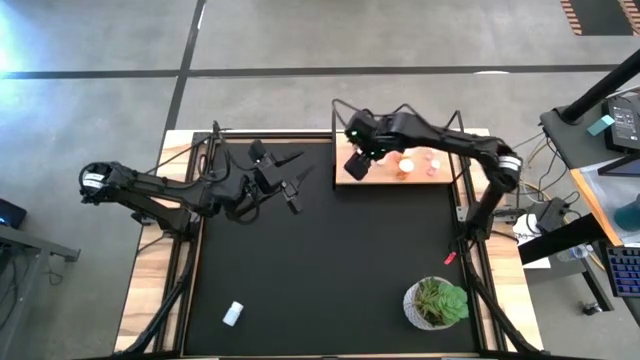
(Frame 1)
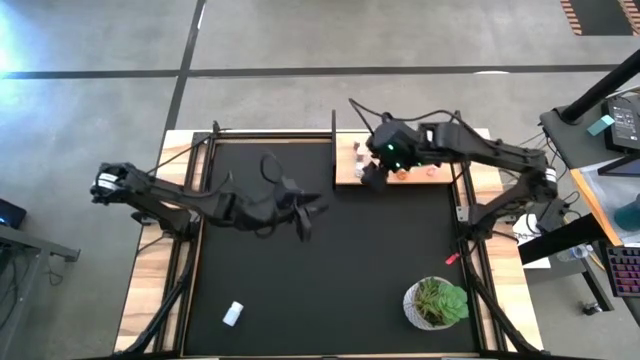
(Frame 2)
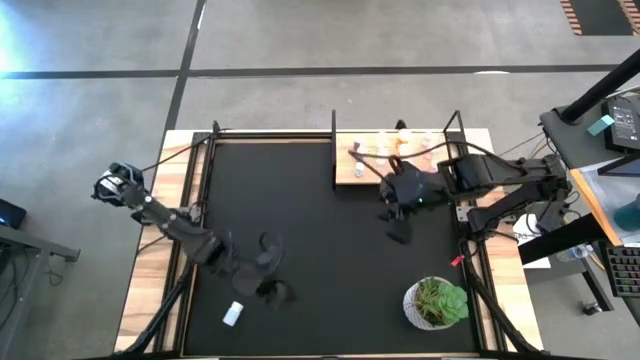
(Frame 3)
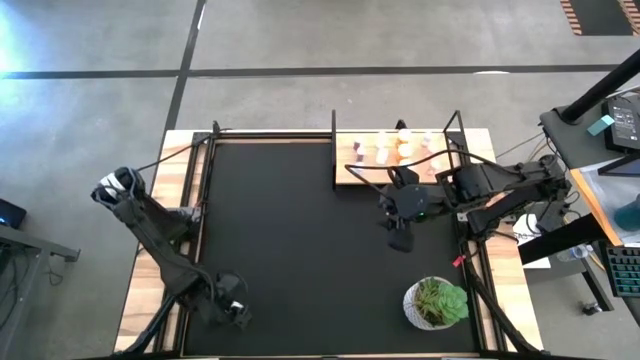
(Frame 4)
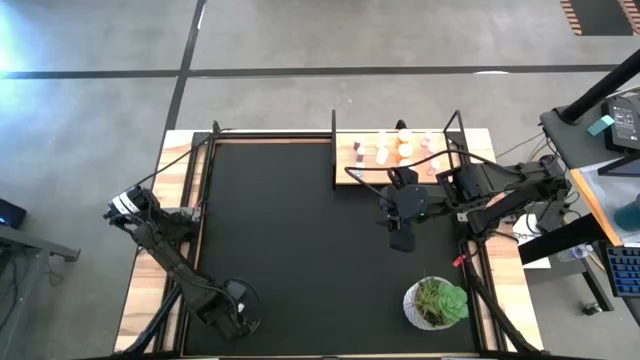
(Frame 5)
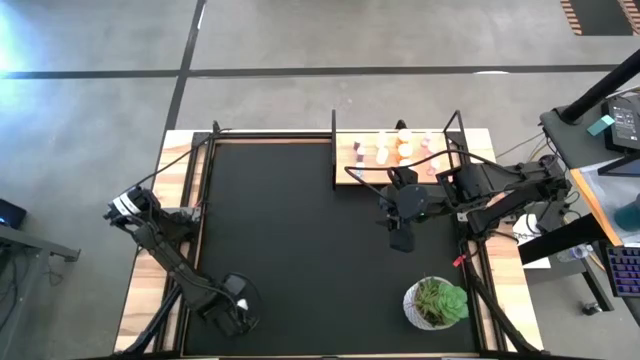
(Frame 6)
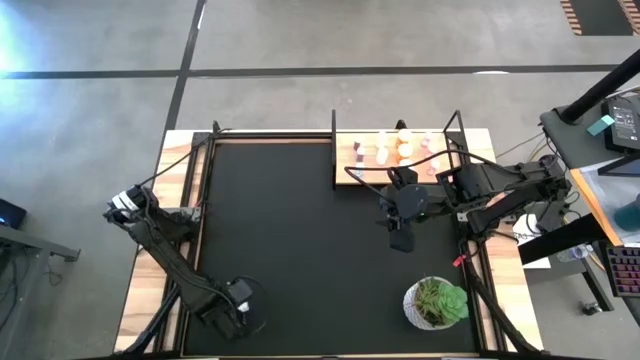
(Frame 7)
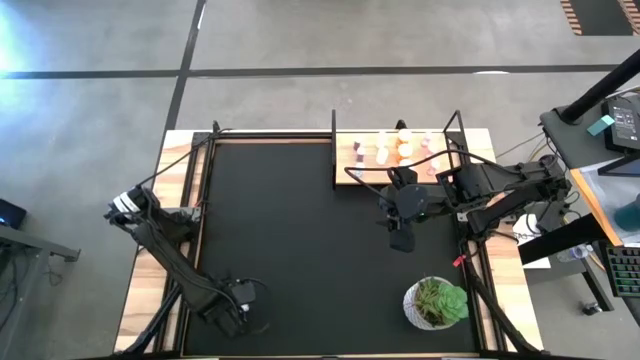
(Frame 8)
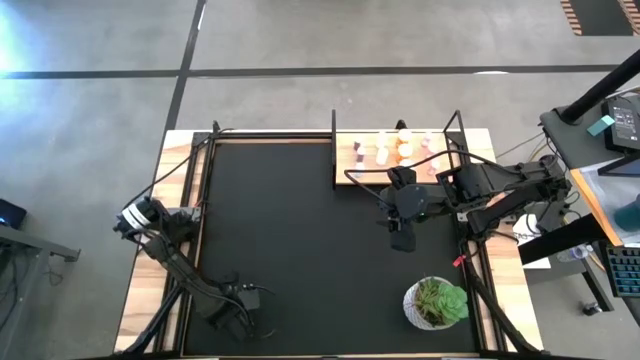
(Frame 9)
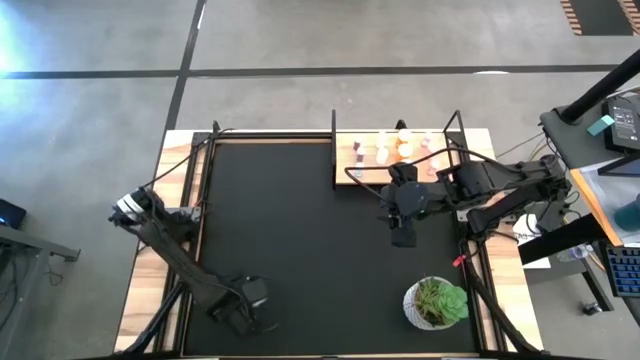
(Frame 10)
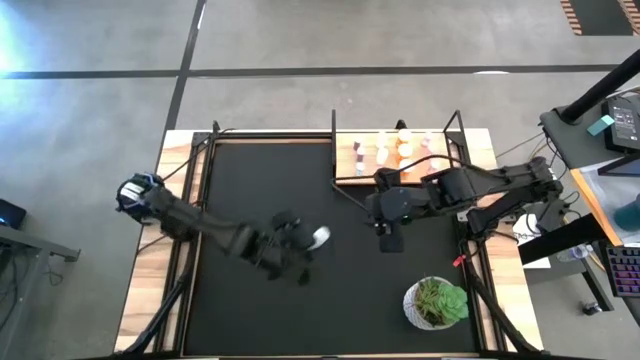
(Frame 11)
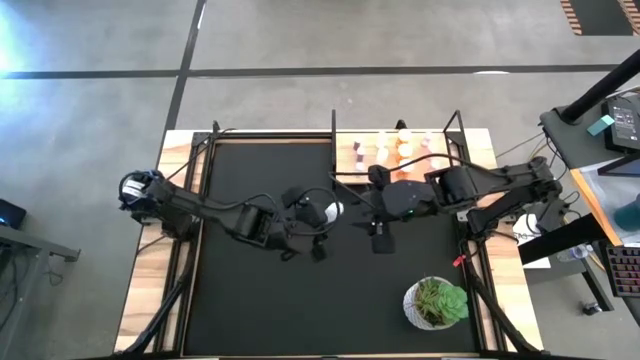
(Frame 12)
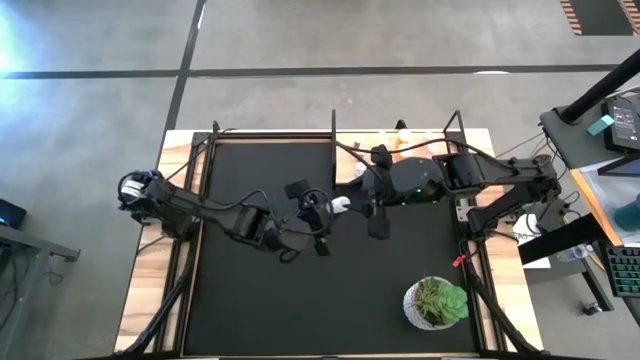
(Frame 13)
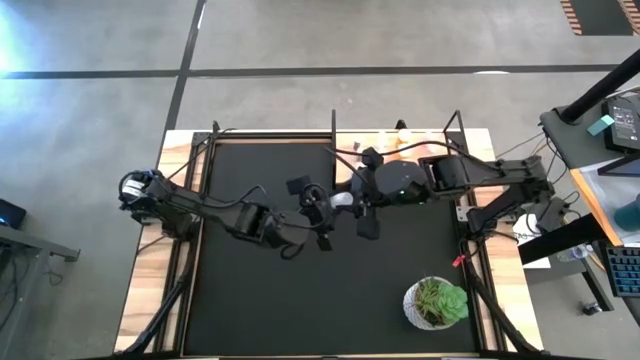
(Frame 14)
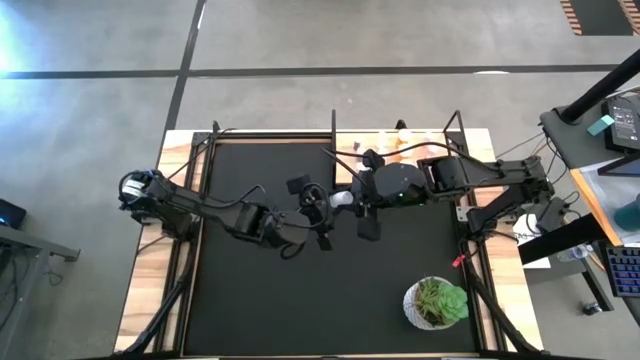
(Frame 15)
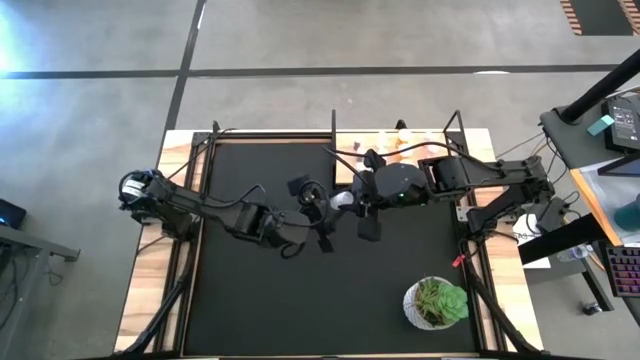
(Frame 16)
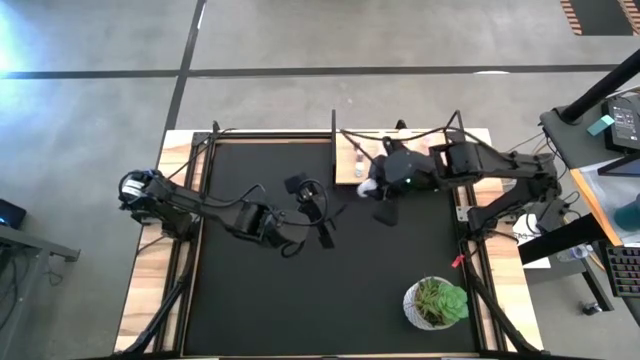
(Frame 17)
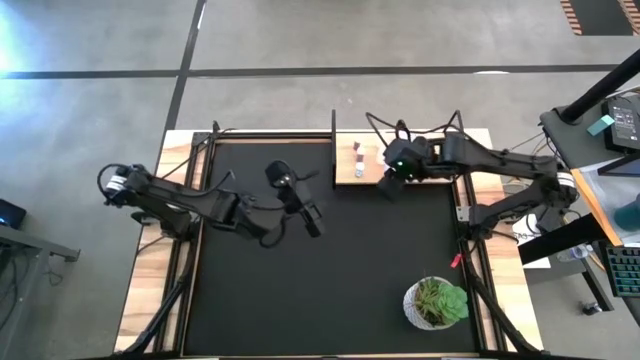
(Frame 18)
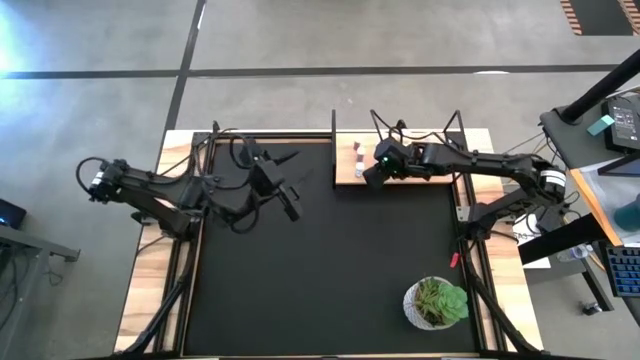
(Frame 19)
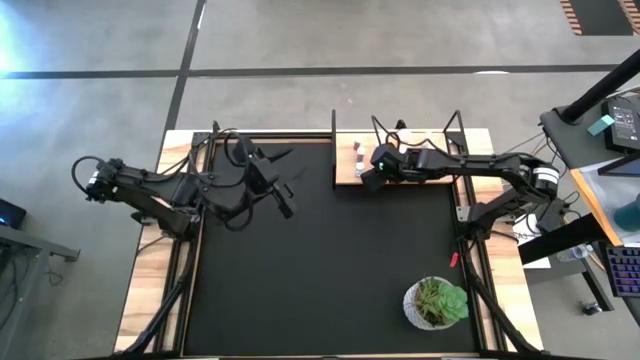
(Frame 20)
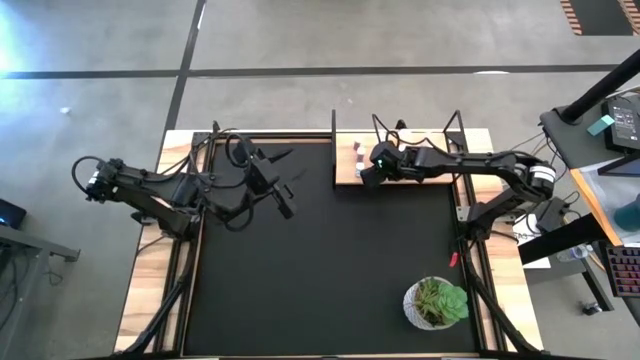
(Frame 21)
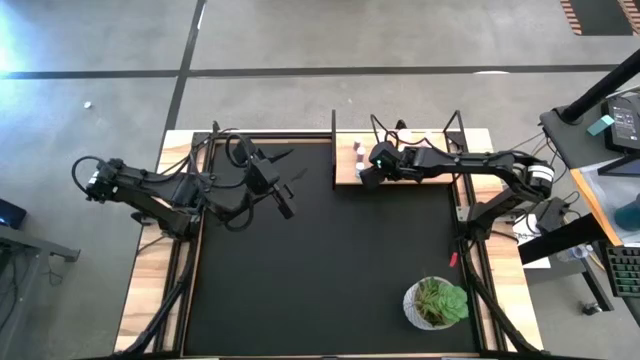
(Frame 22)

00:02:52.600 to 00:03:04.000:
Task: Pick and place medicine bottles onto shelf by color
Put the white pill bottle on the shelf aligned with the other white pill bottles

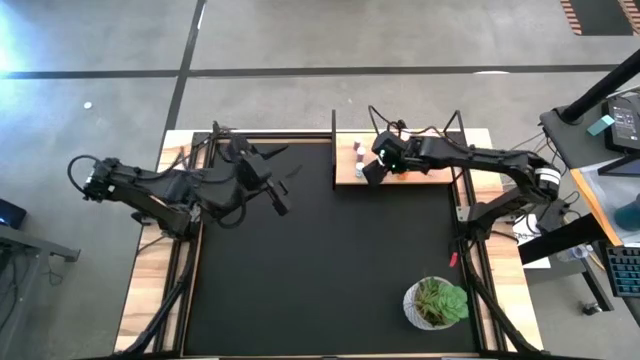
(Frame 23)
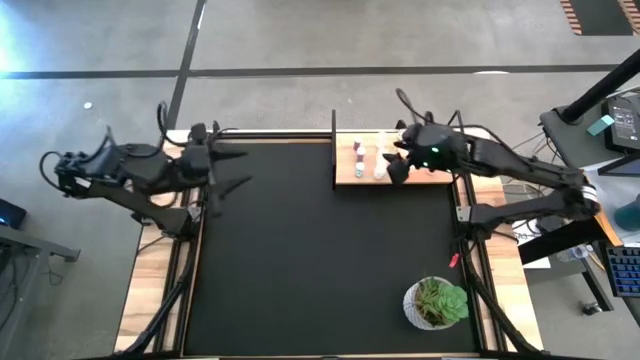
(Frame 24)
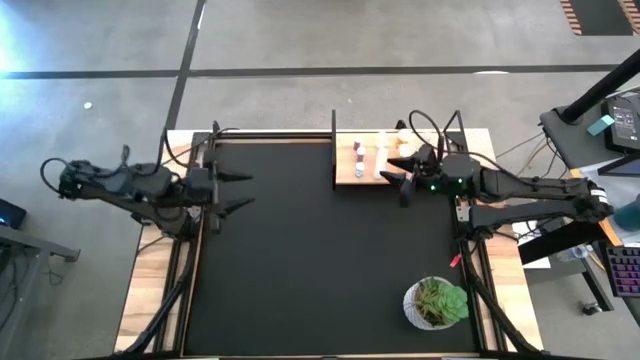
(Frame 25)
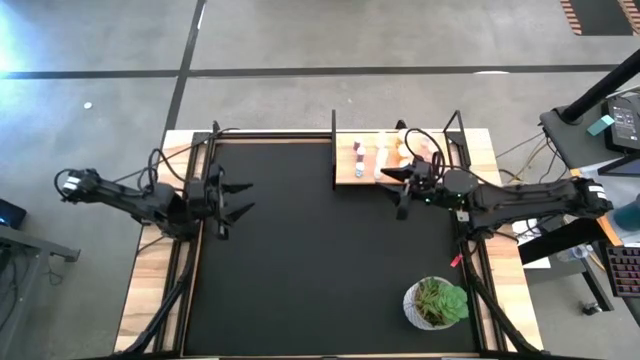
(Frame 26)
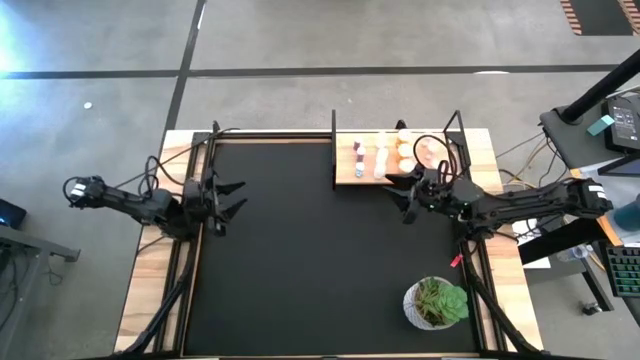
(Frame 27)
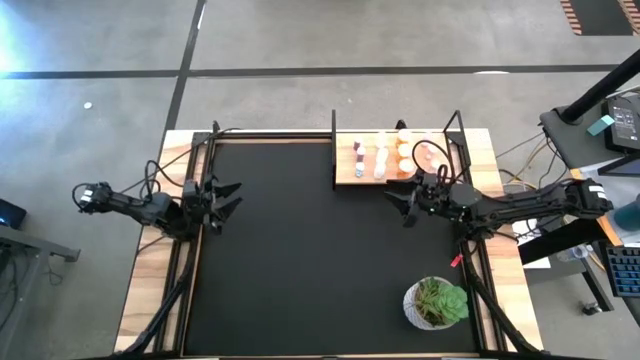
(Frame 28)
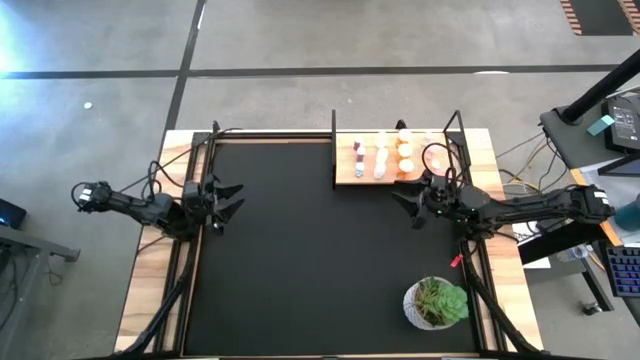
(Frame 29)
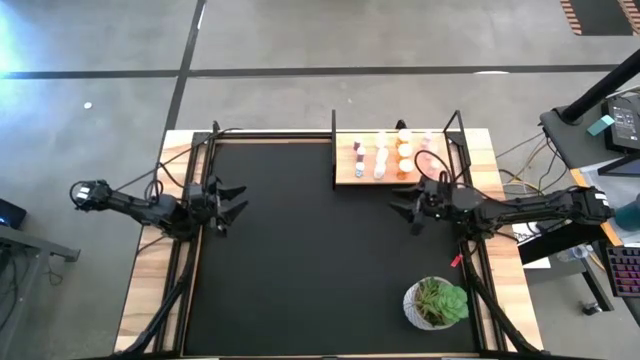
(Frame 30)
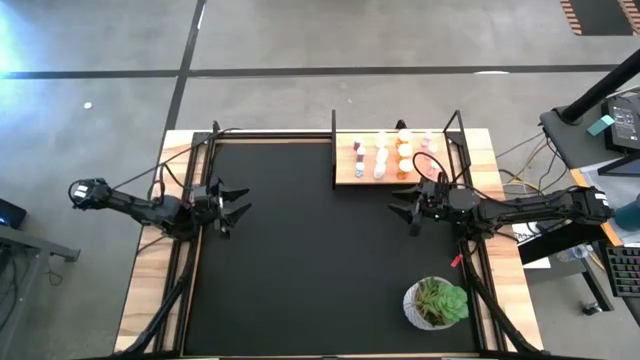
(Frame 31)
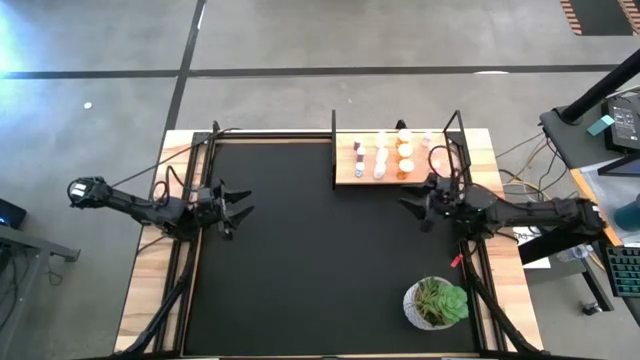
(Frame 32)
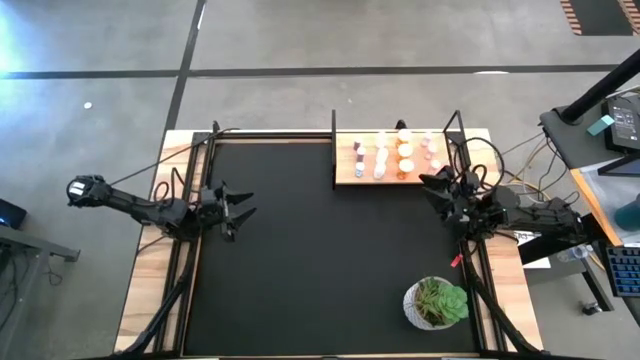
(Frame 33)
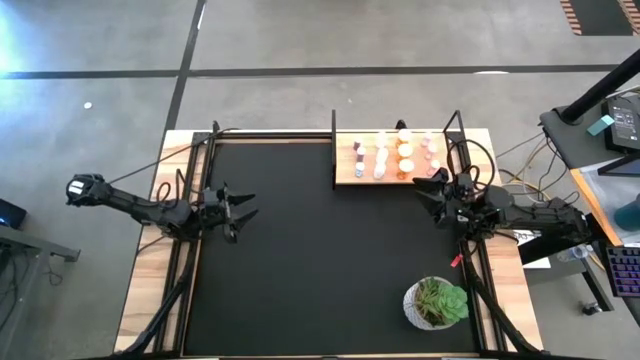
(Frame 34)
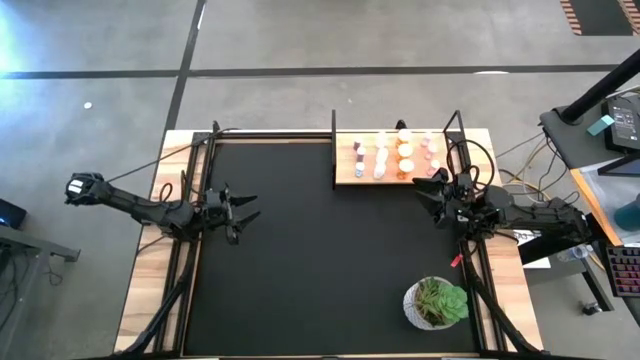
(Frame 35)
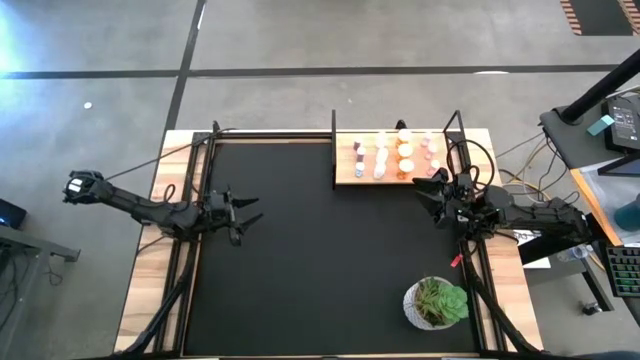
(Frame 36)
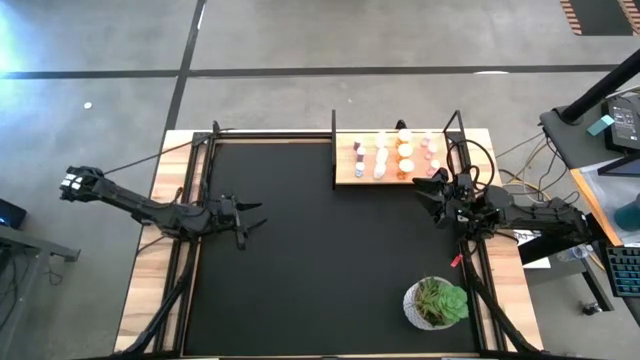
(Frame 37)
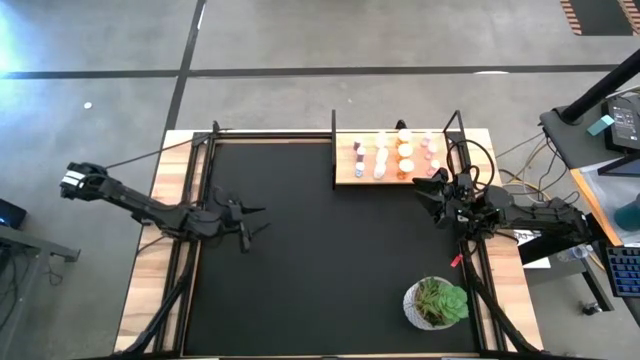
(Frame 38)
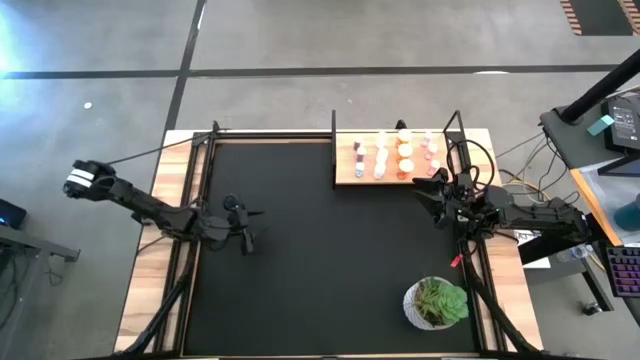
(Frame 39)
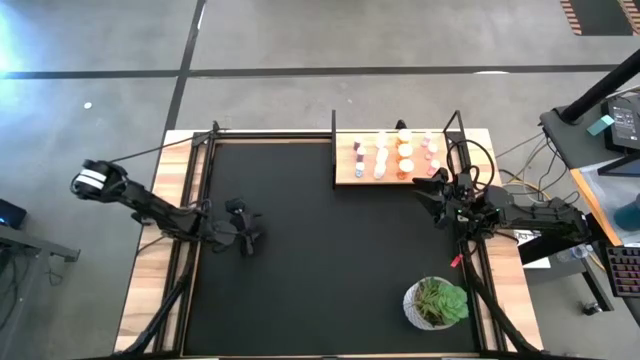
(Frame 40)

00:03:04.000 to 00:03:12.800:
Return to Home Position

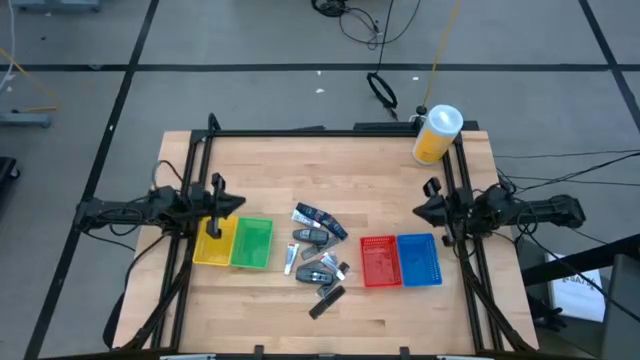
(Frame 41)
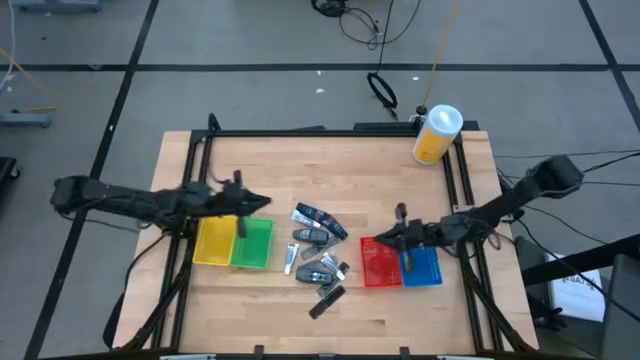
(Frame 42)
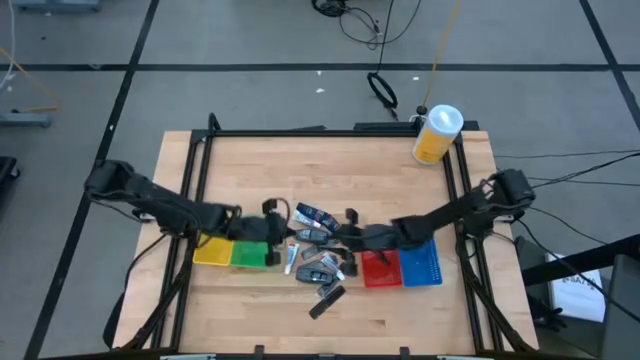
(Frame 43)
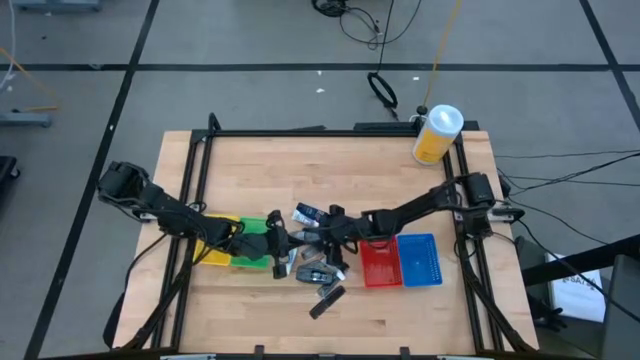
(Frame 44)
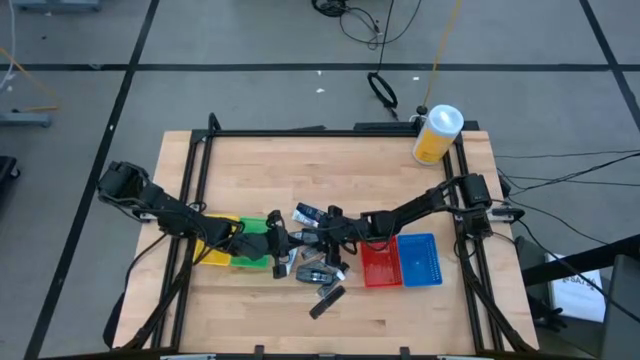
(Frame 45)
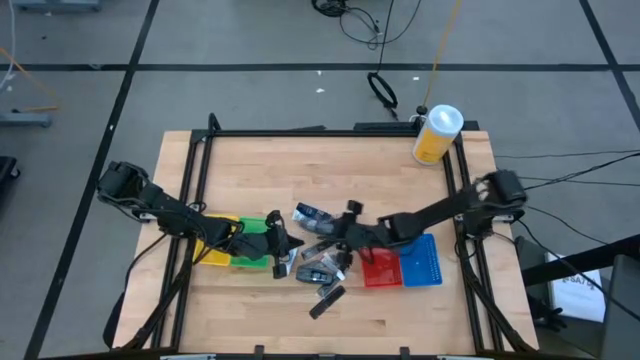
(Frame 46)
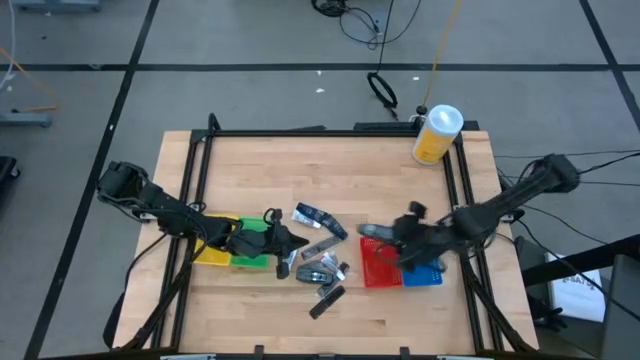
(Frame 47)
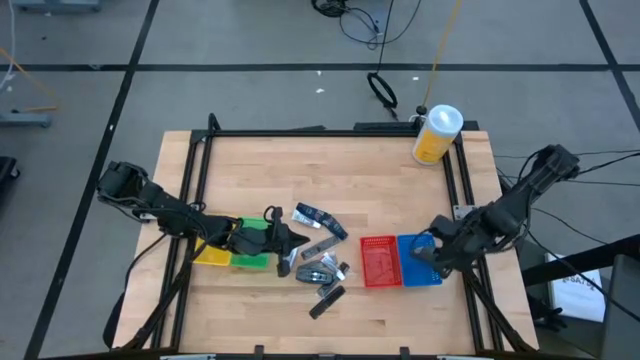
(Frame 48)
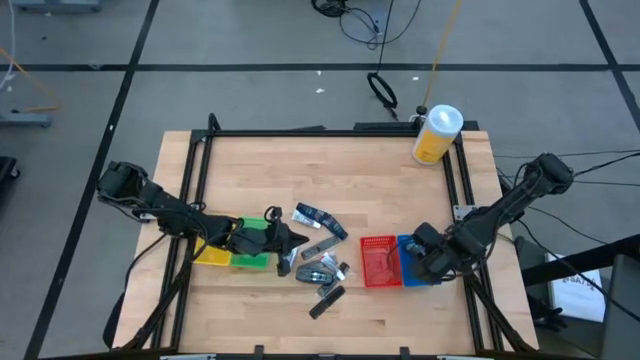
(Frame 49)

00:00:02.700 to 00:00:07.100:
Task: Pick & Place Travel size toiletries
Put the black deodorant into the blue bin
